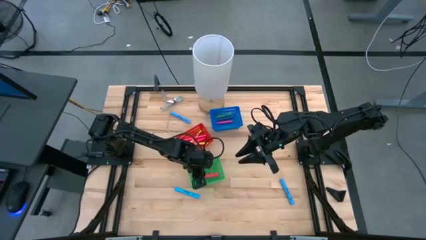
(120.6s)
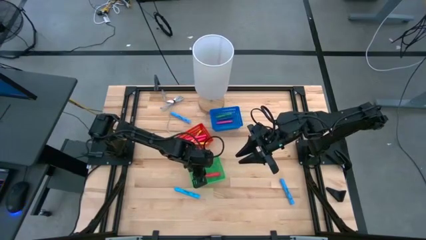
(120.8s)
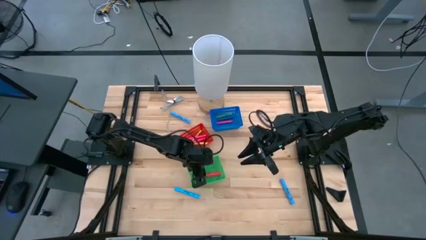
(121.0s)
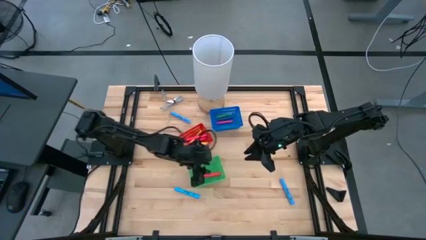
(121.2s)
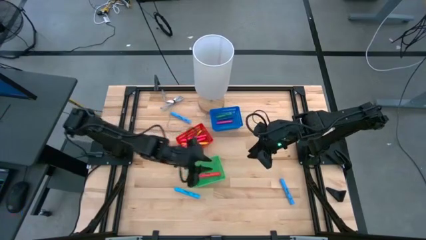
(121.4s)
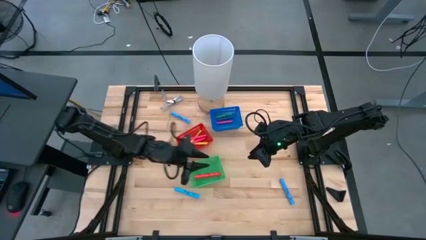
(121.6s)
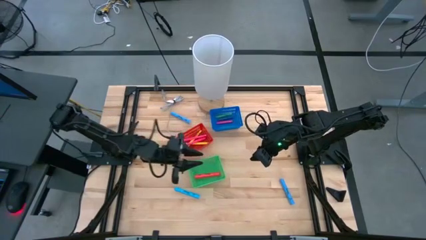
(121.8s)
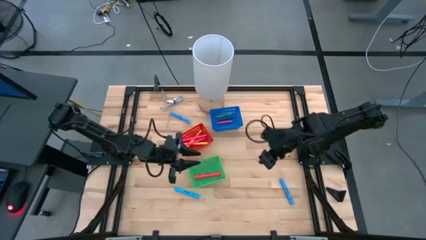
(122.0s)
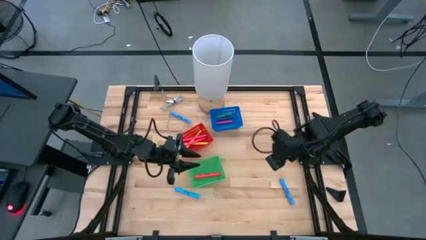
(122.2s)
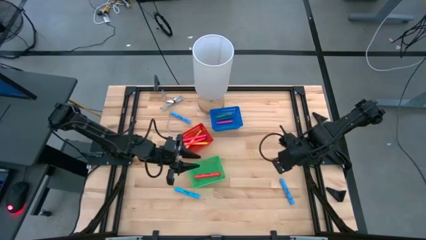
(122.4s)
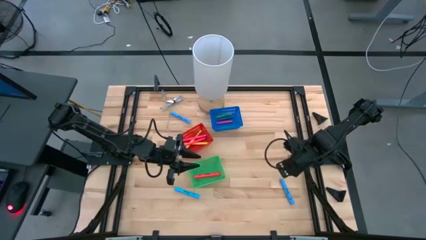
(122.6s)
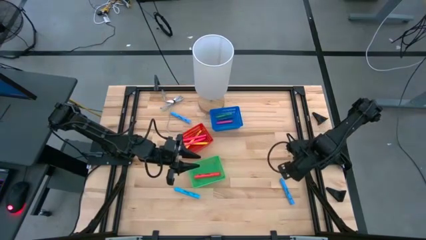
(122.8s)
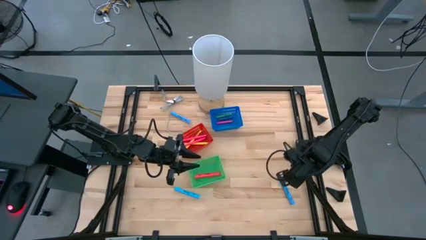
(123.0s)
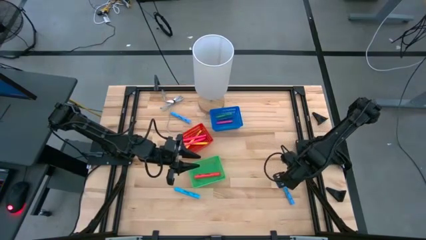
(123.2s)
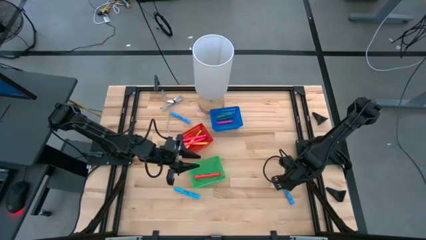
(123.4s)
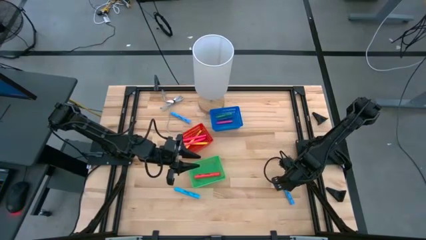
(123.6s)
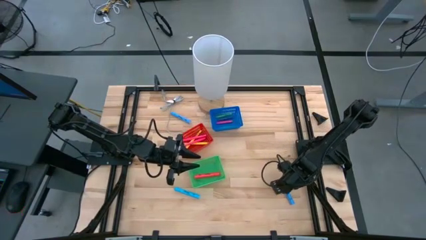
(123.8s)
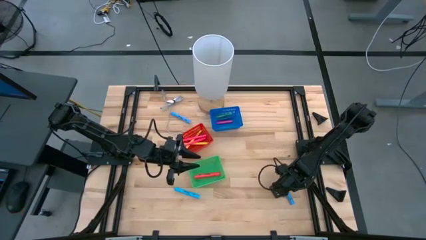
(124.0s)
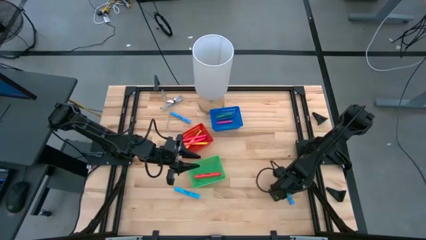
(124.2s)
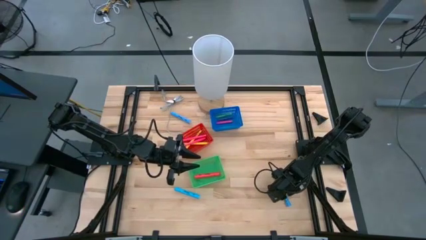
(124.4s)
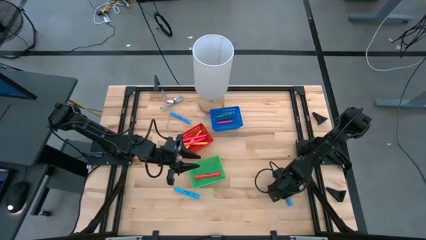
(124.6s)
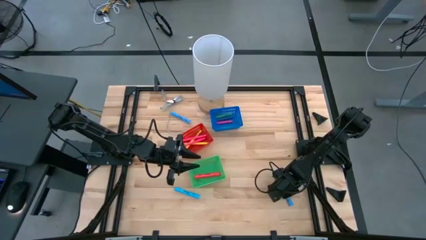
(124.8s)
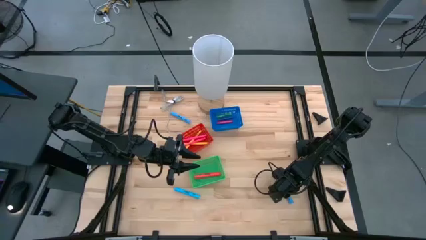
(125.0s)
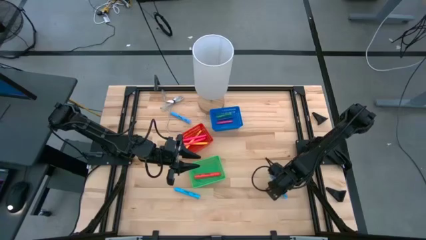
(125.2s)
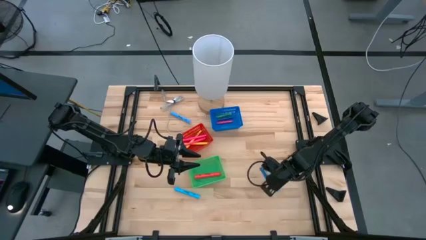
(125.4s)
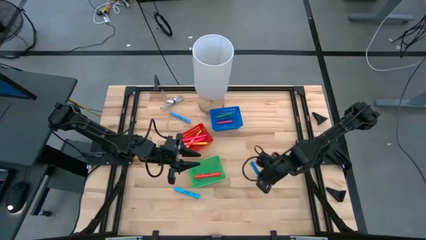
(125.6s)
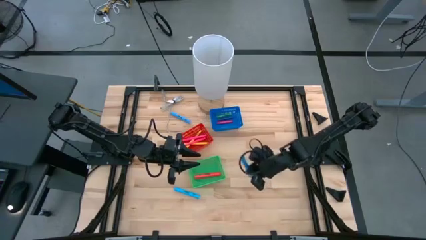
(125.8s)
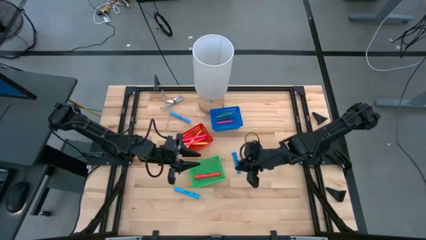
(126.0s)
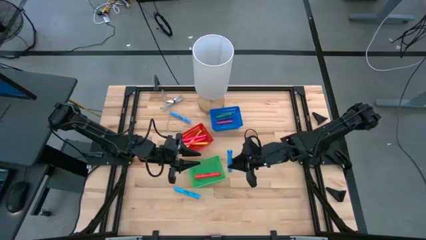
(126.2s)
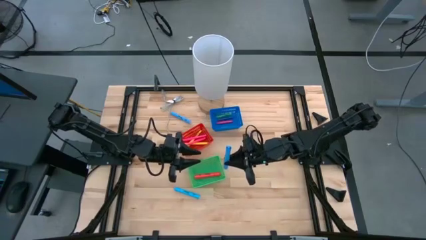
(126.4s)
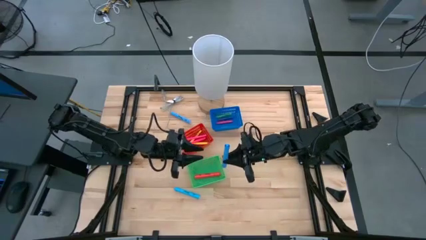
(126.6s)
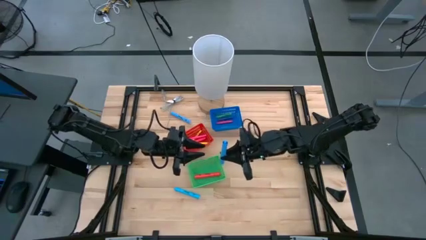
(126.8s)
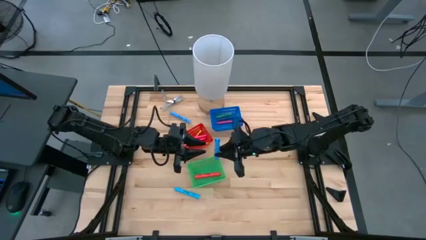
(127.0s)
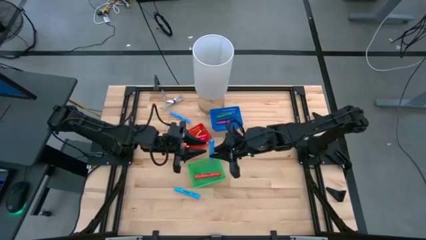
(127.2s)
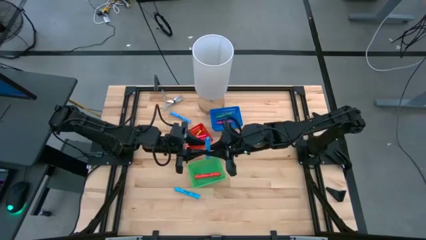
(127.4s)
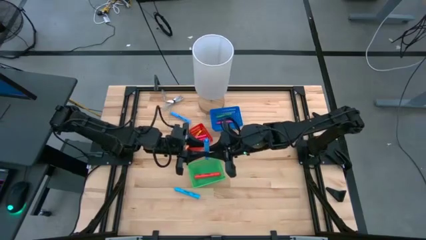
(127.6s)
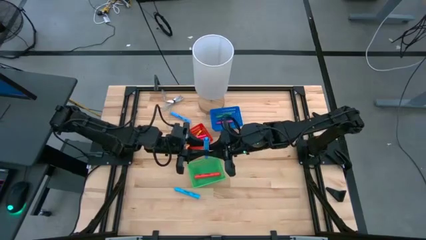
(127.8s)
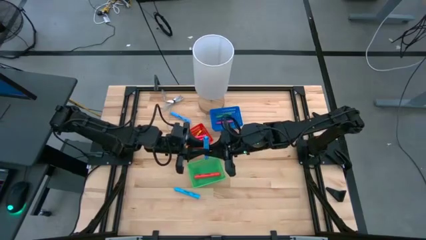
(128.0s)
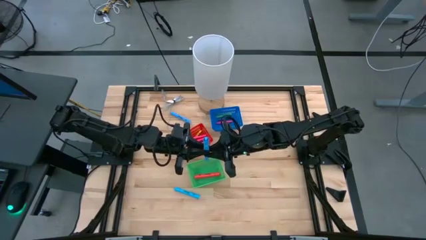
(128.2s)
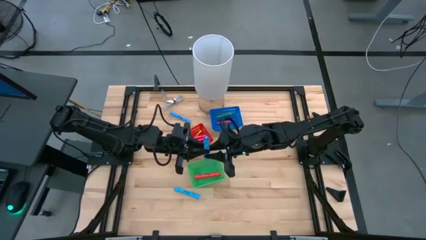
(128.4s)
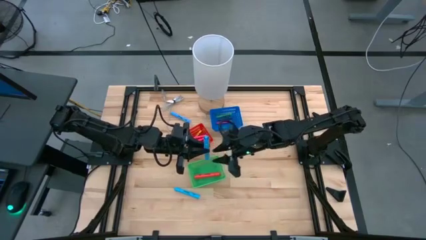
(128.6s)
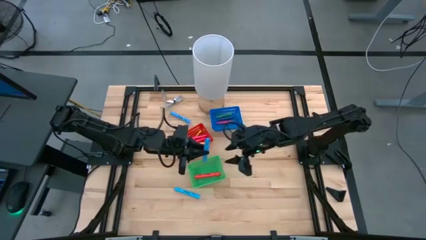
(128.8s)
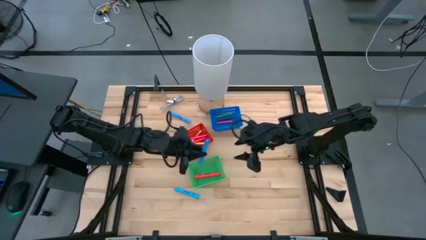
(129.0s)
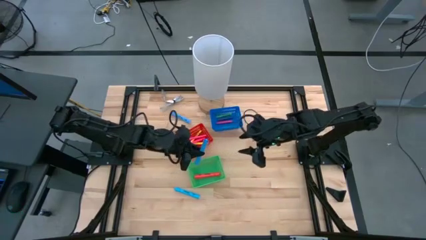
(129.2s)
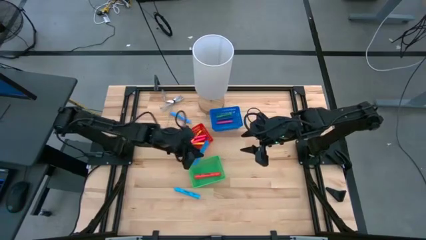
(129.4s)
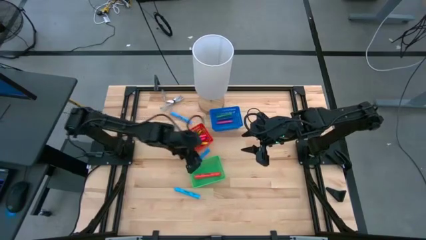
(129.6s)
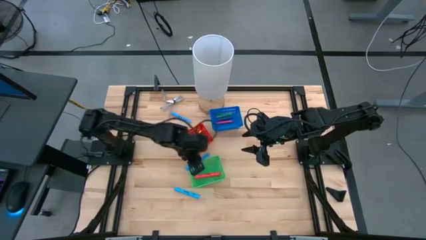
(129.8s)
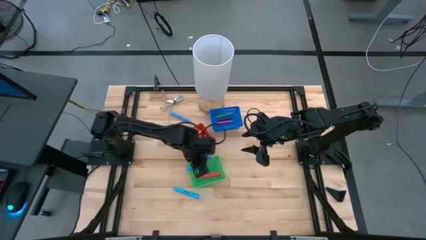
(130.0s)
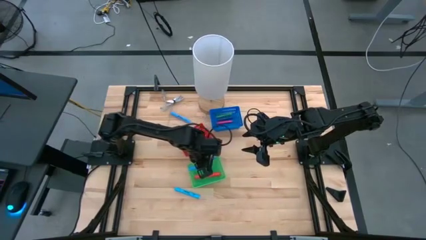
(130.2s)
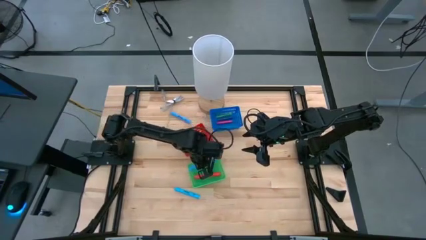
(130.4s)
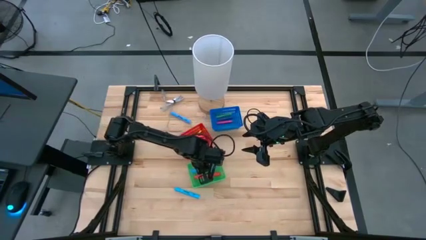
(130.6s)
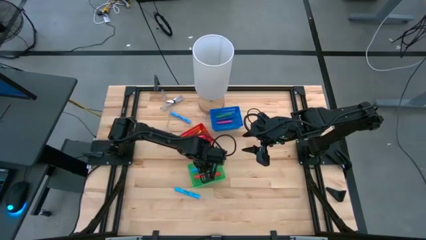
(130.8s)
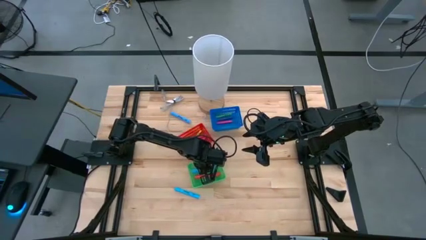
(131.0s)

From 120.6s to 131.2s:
Task: Pick & Place Markers
Put the bottom right blue highlighter into the green bin

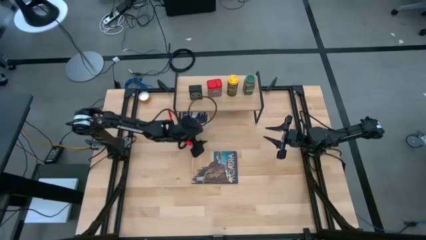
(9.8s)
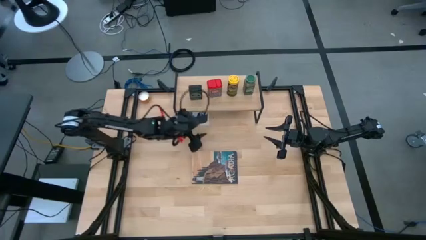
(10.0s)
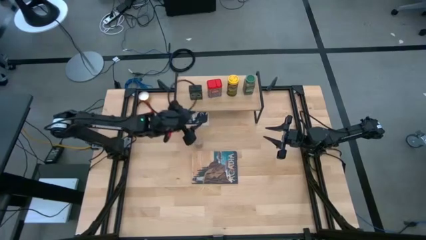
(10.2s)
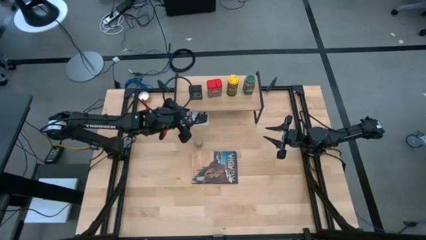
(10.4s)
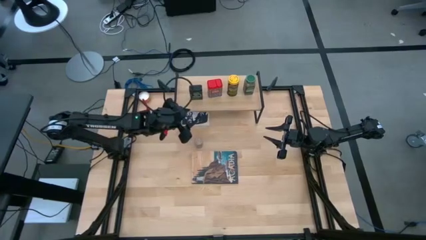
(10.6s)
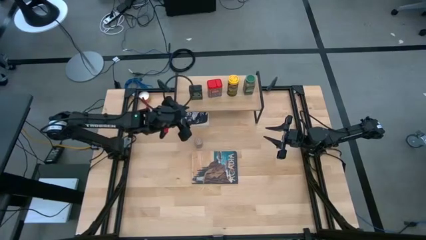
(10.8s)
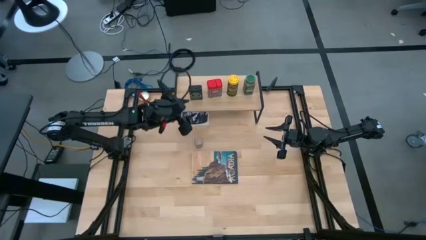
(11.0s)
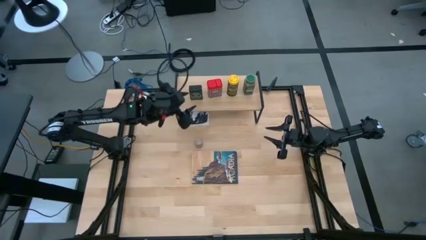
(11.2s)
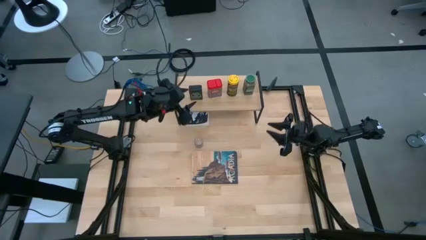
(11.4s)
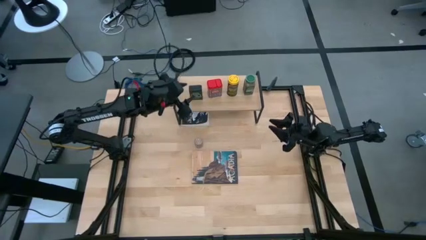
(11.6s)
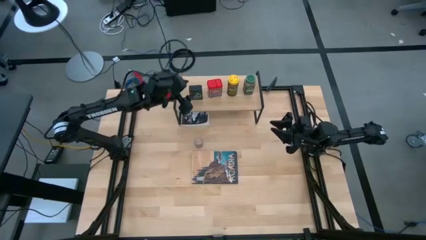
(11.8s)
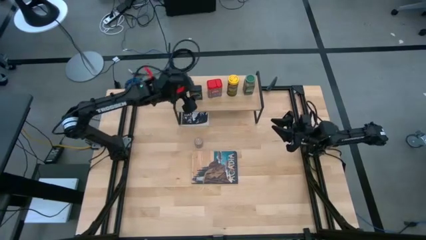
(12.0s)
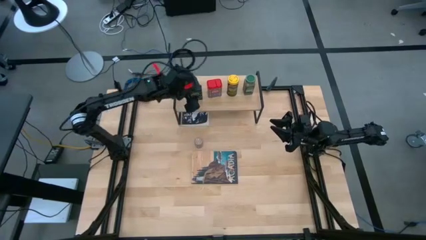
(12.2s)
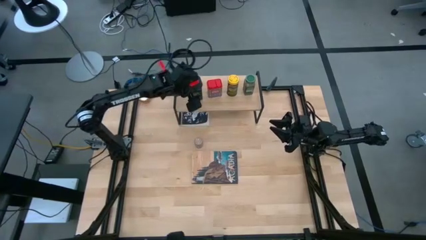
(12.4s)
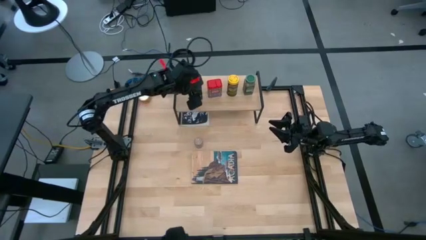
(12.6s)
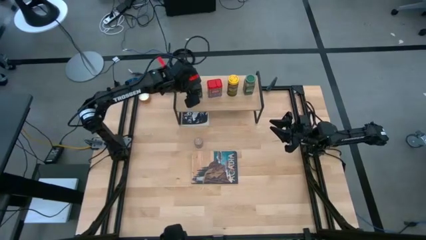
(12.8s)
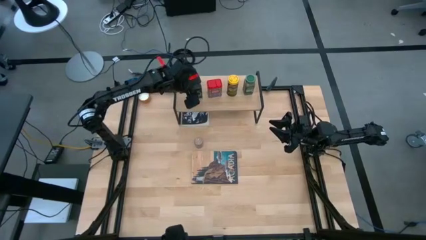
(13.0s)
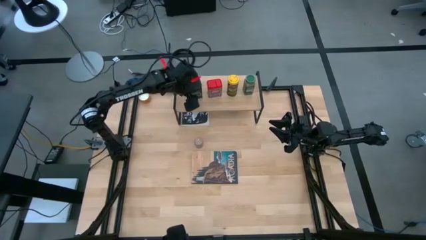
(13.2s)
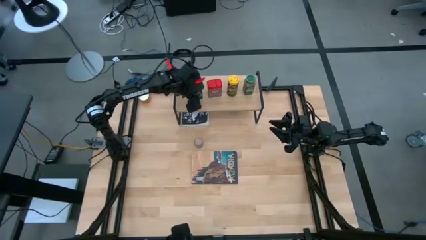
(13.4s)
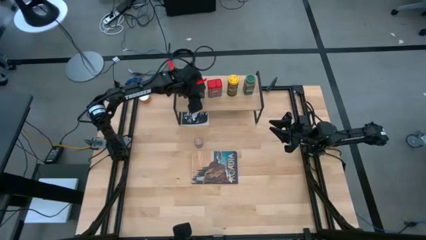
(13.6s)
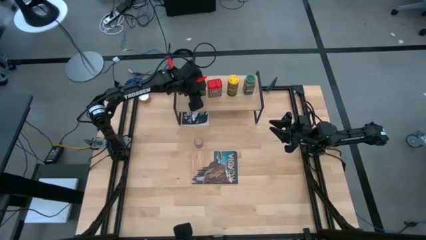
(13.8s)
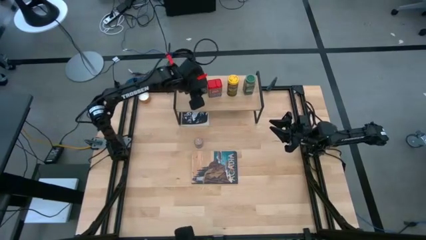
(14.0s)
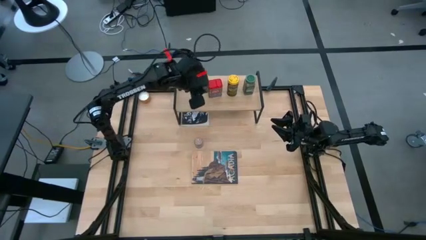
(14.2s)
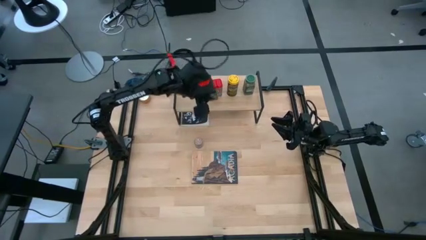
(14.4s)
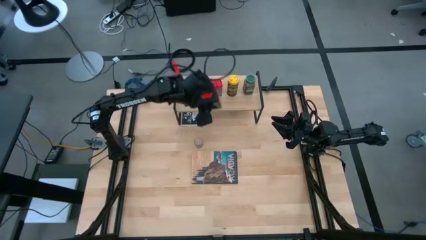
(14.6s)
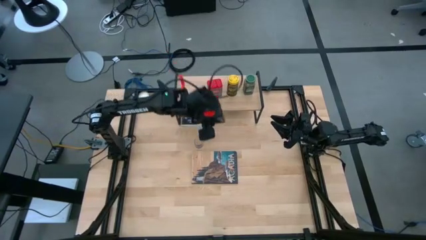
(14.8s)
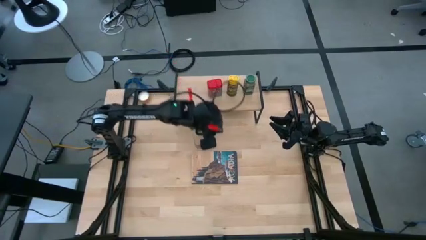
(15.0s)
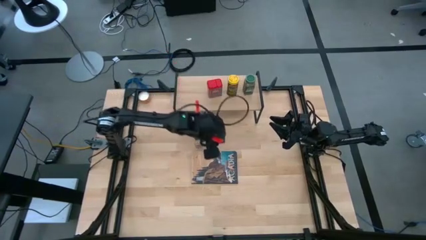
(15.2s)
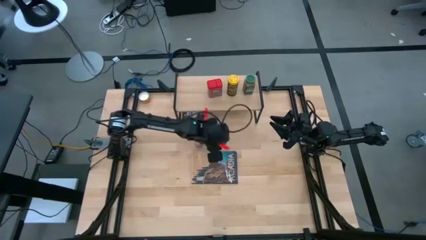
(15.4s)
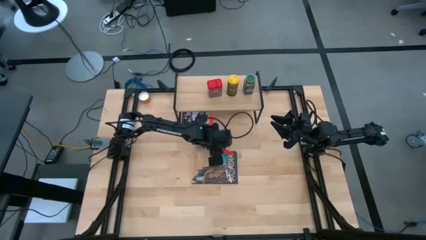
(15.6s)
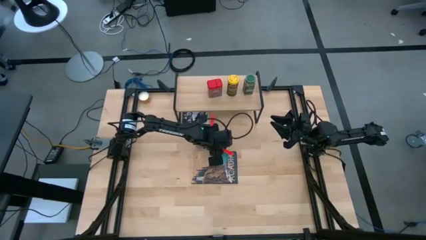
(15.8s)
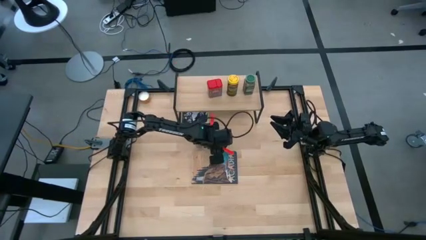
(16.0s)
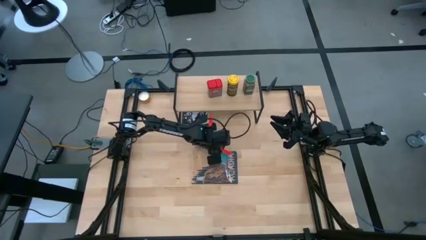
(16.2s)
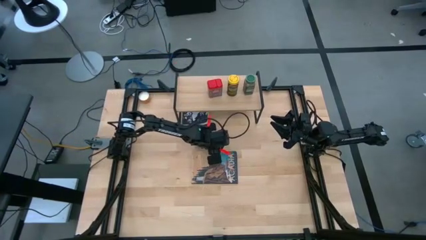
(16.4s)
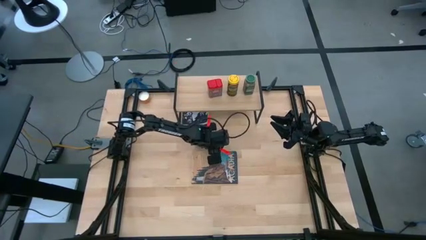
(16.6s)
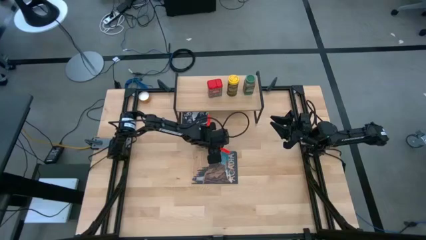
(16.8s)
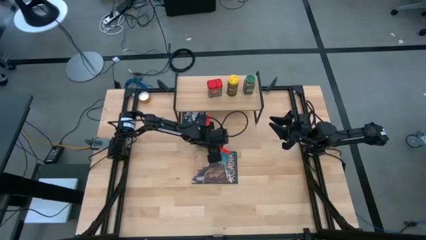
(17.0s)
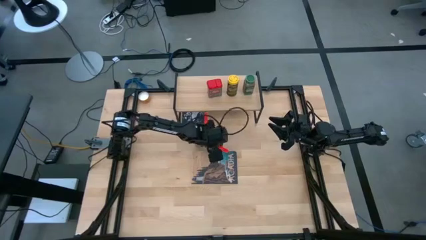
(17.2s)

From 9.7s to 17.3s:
Task: Shelf spices
Remove the black seasoning can from the shelf
